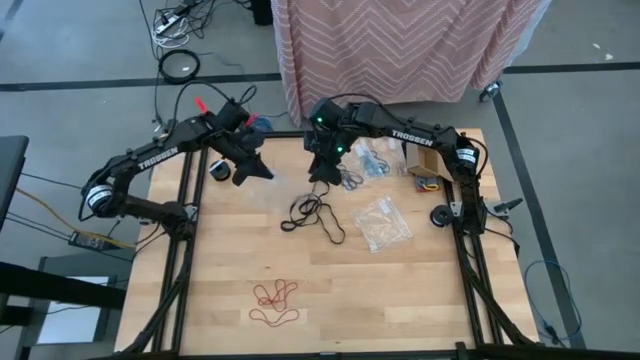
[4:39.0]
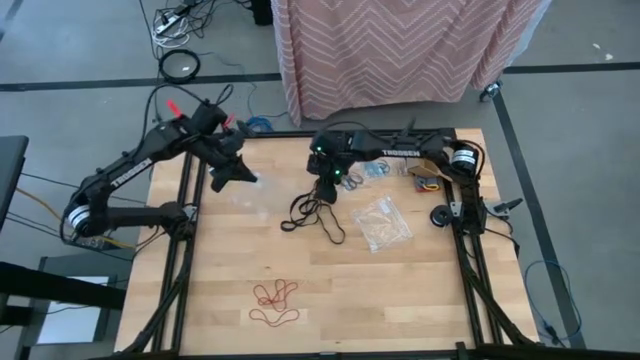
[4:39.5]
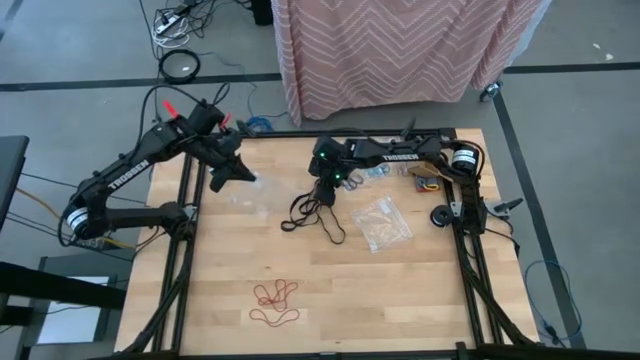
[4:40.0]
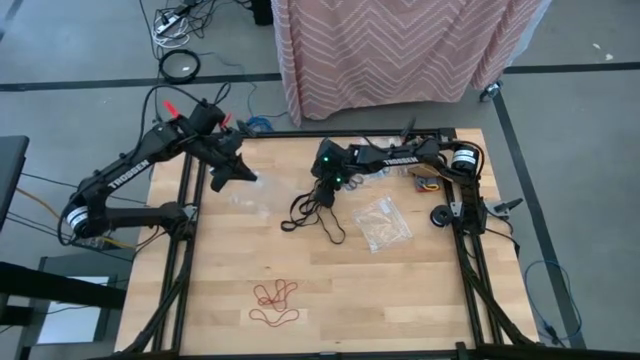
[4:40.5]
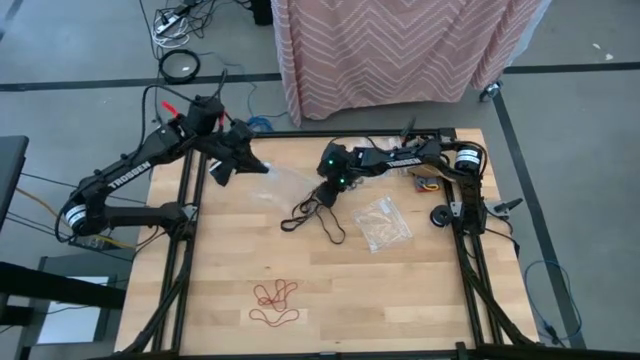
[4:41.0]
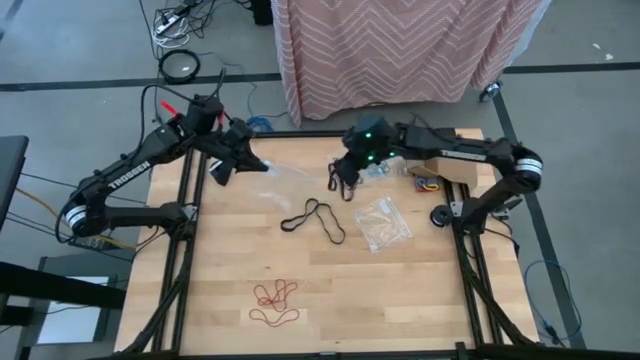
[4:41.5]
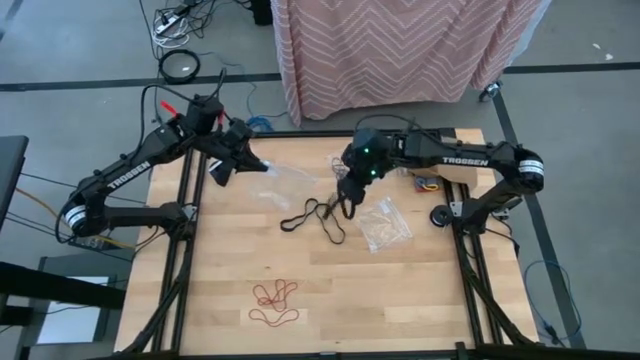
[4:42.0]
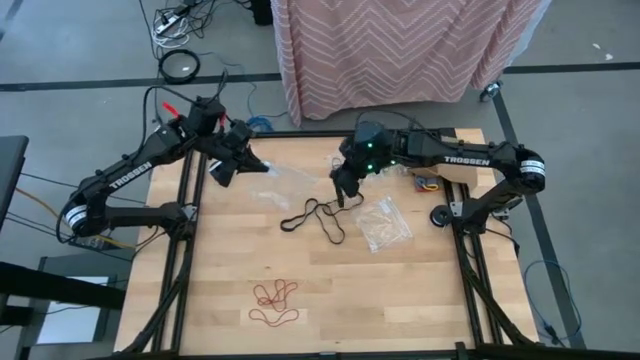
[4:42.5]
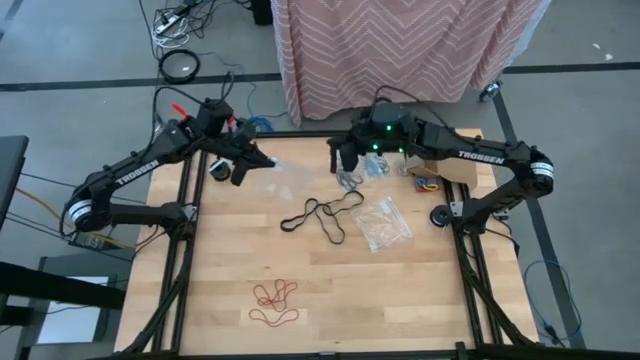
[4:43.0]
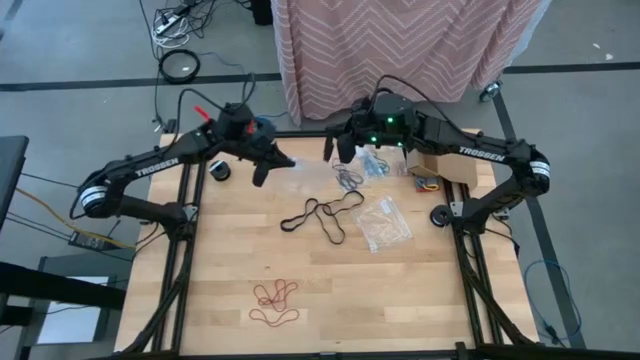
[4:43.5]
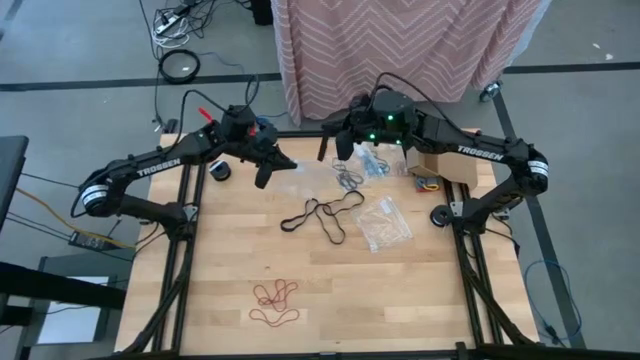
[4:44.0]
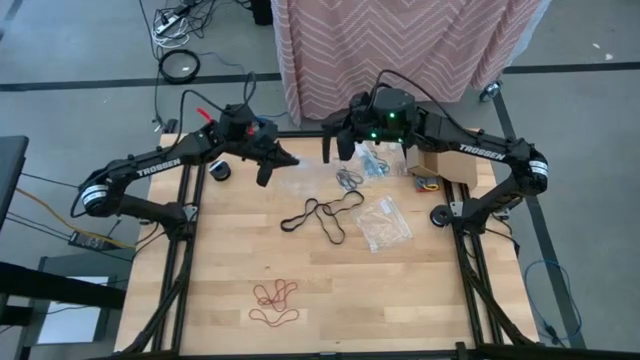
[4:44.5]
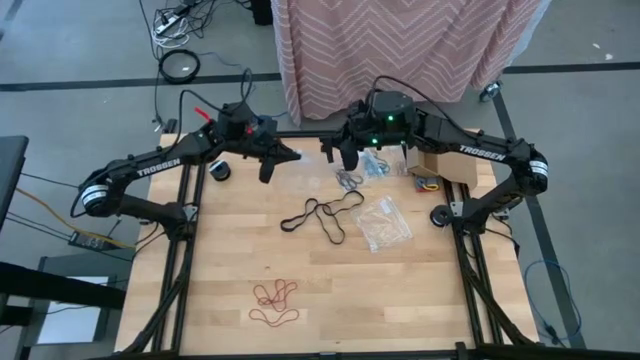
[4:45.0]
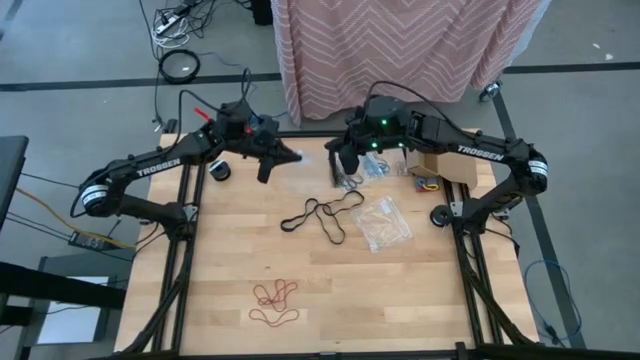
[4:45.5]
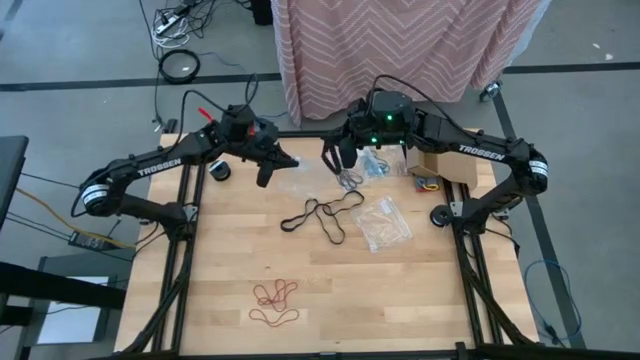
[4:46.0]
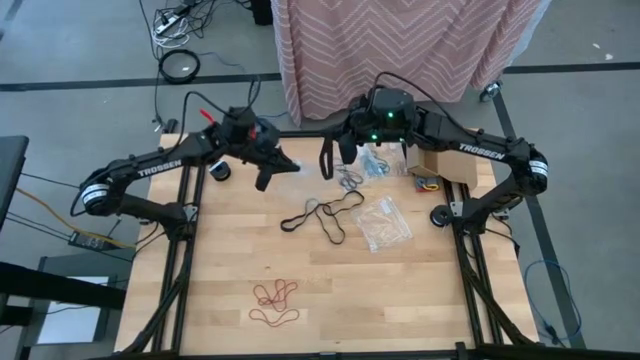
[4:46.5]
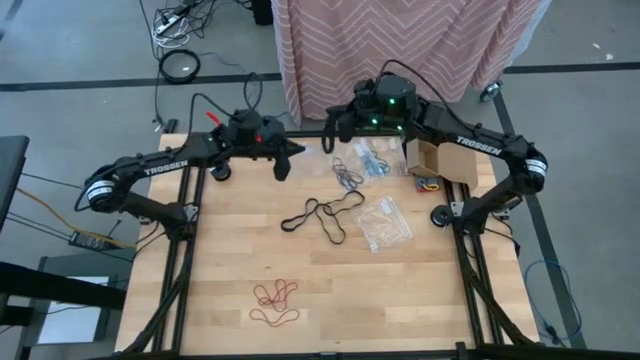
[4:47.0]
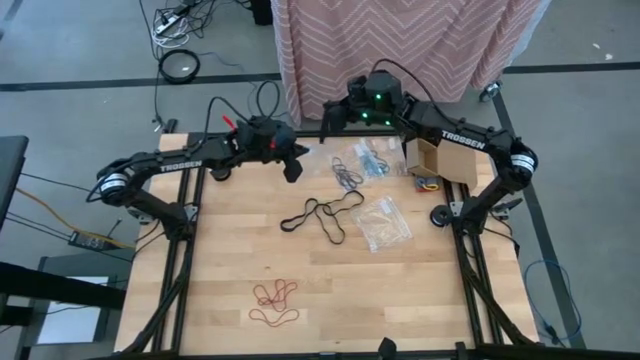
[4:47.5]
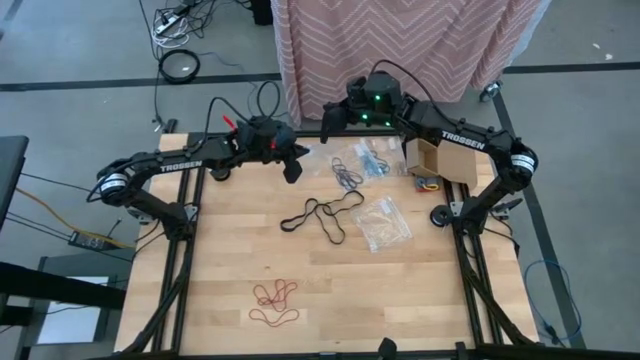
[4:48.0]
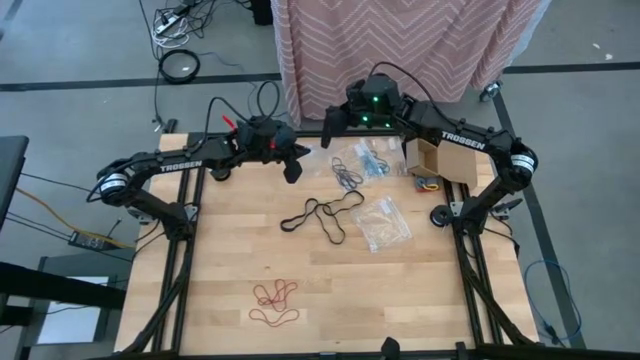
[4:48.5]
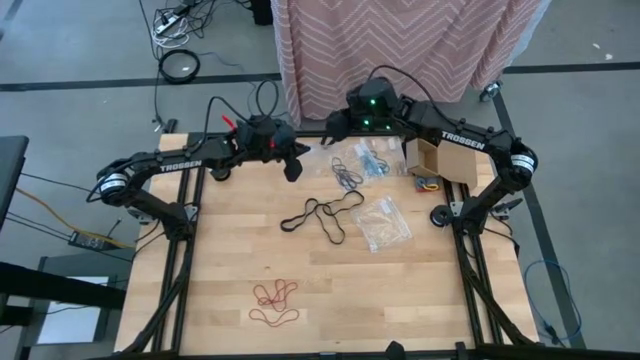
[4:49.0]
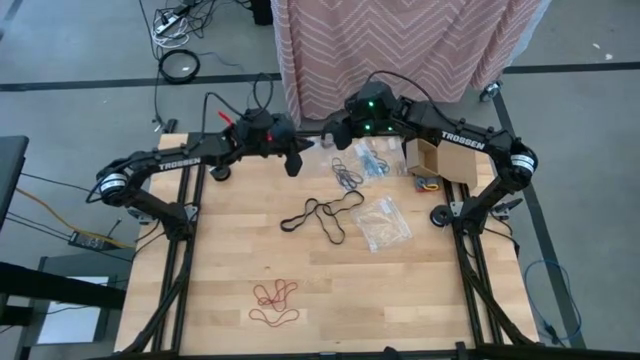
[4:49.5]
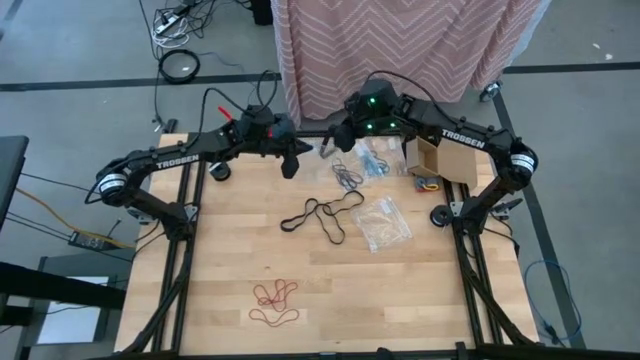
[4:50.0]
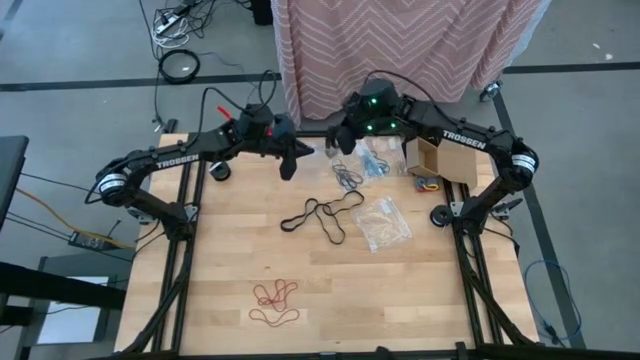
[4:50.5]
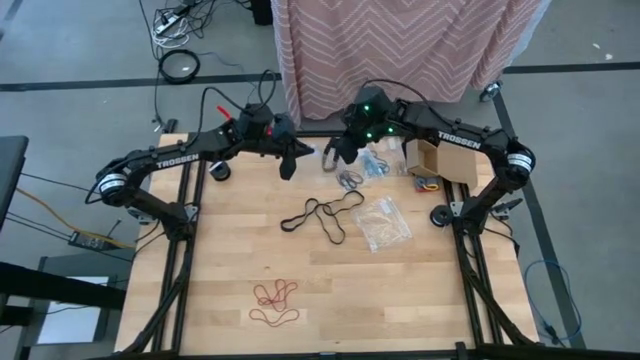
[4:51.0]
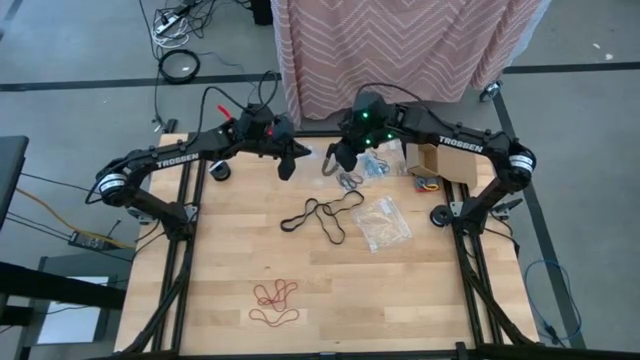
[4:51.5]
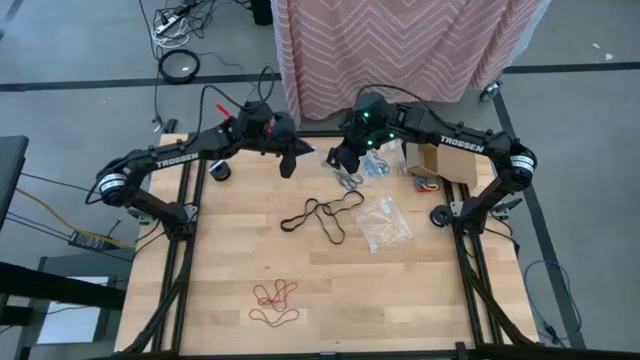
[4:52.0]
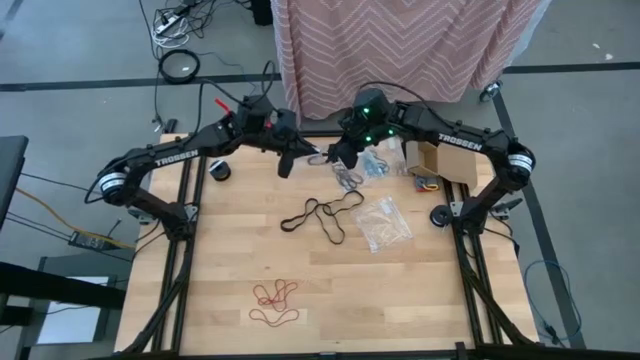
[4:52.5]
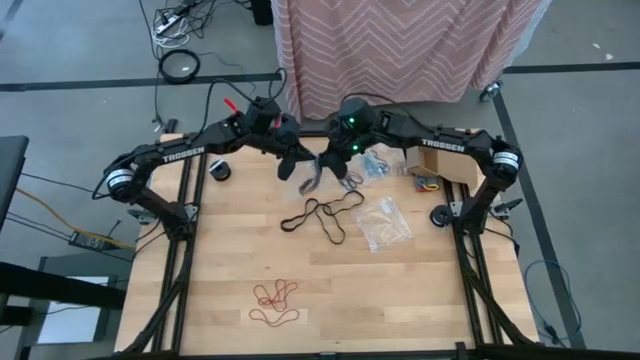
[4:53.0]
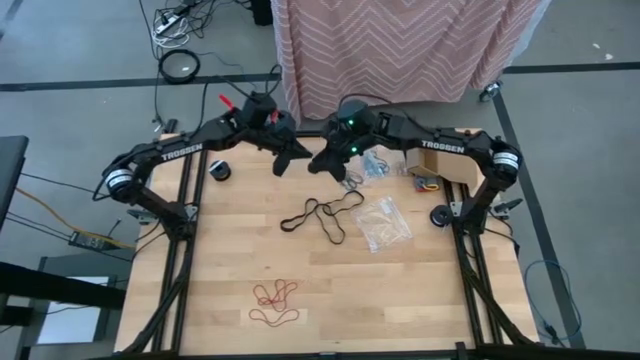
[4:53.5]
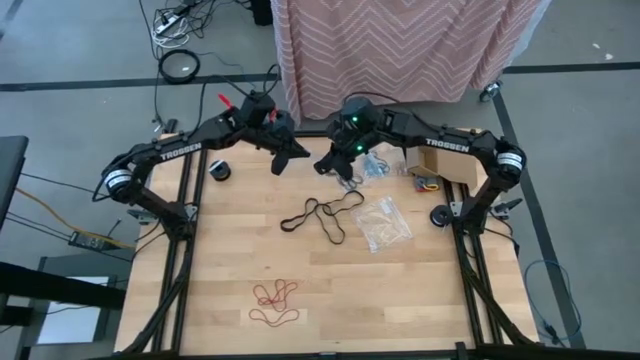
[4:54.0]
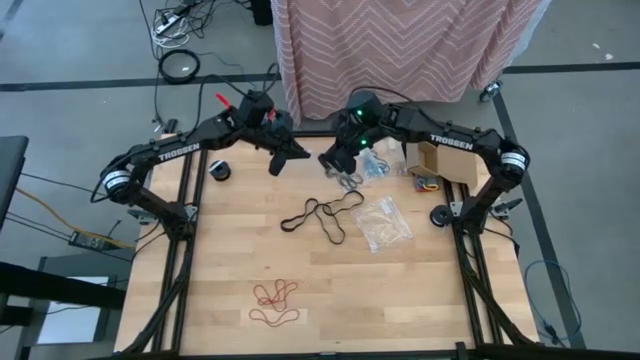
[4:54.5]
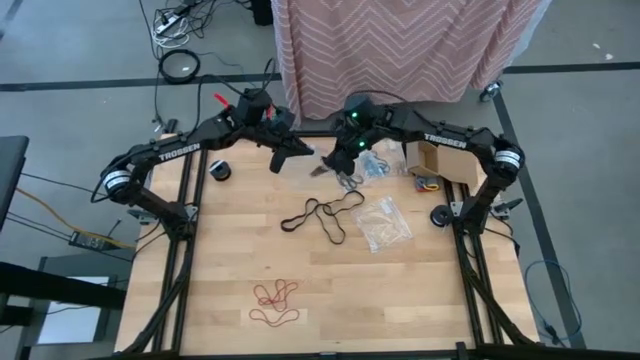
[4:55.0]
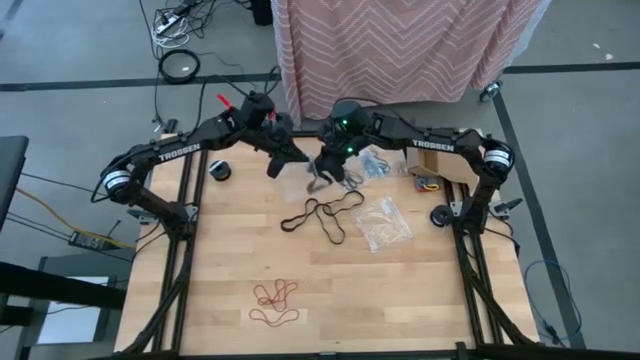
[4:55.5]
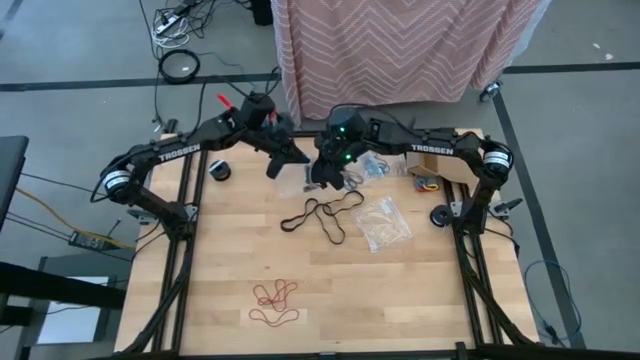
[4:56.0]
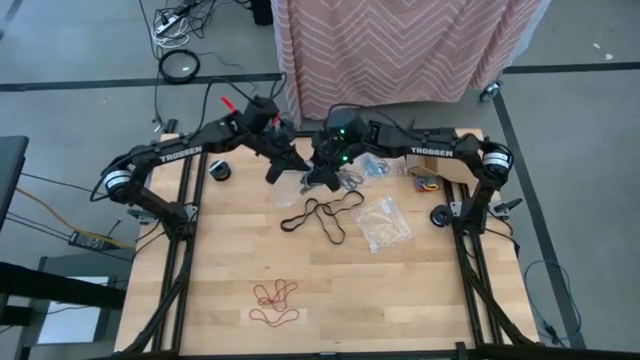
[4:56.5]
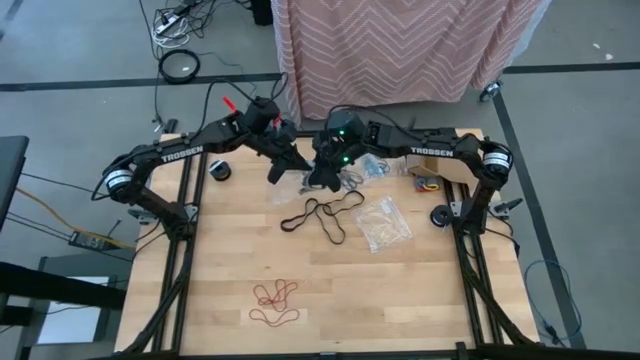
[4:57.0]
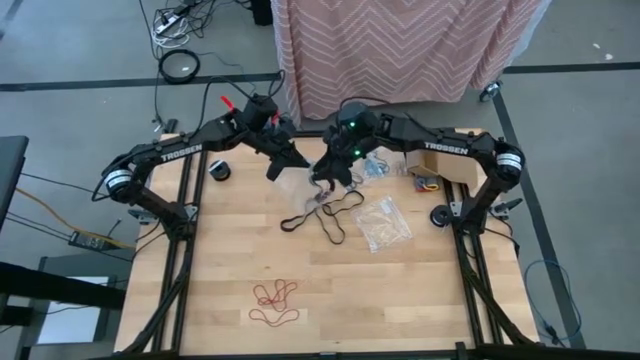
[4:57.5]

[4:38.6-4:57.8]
Task: Sort rubber bands
Put the black rubber band into the left transparent zip bag

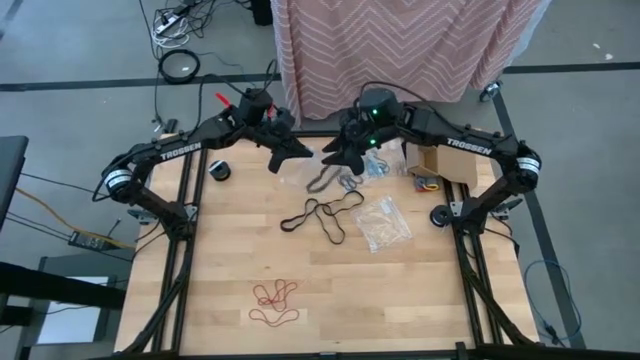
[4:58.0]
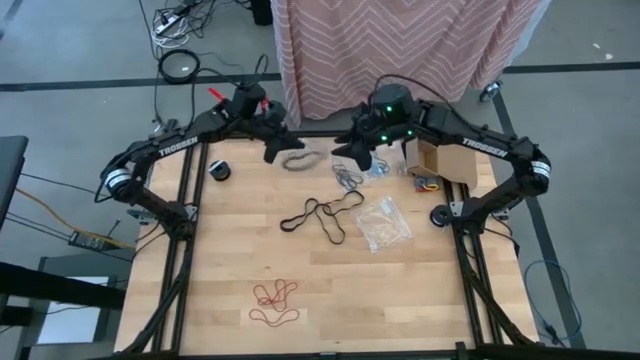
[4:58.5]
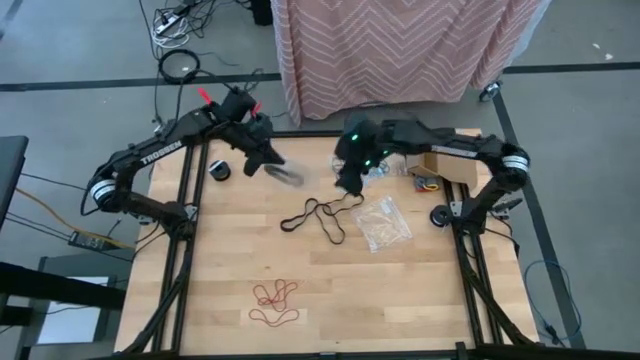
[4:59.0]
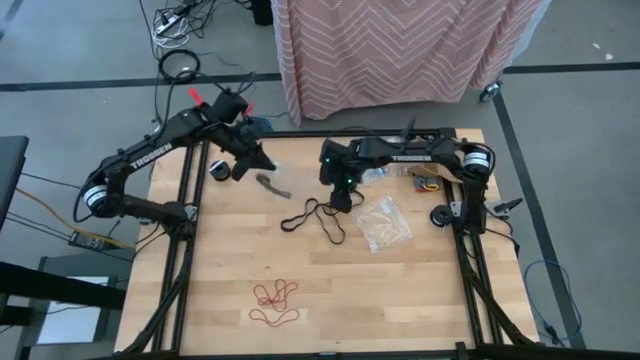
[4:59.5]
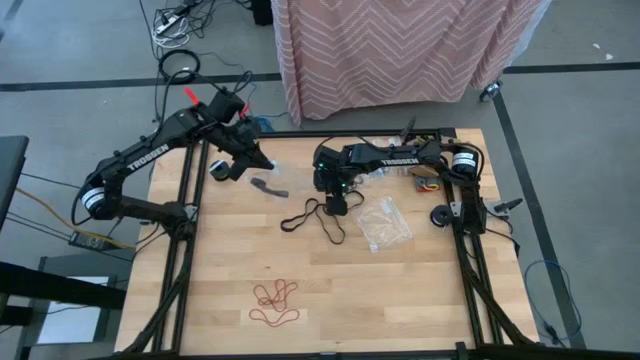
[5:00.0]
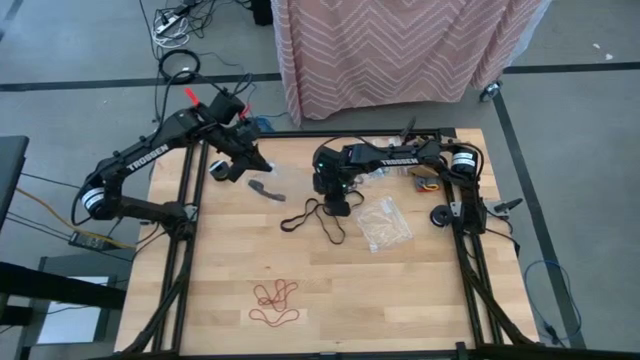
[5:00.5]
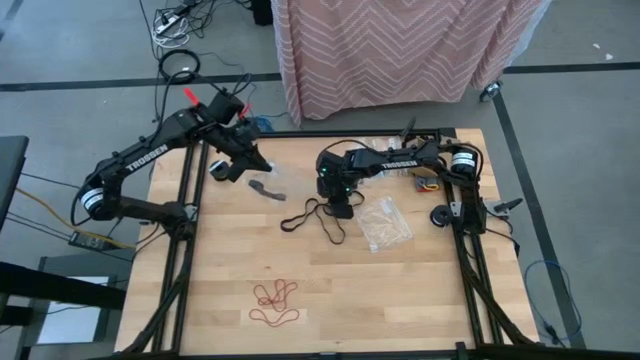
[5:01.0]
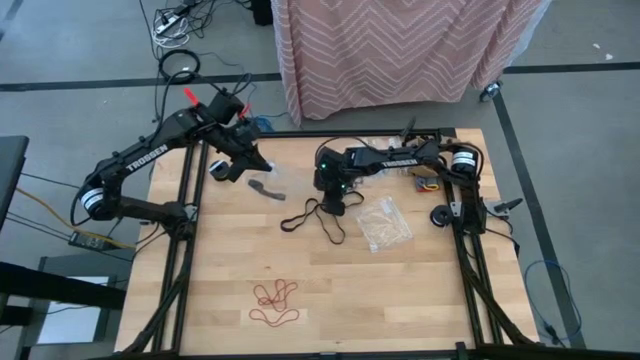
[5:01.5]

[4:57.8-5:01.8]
Put the black rubber band into the left transparent zip bag
